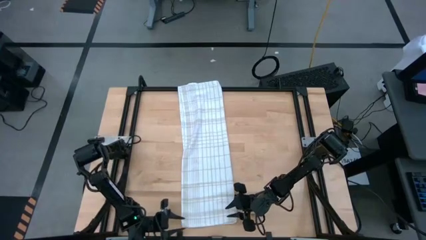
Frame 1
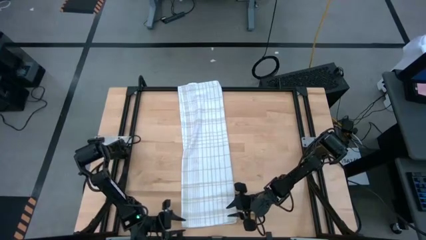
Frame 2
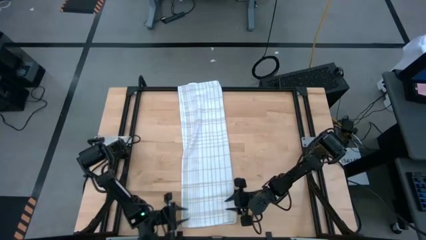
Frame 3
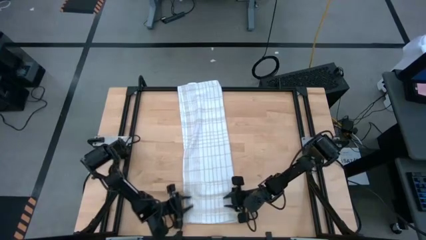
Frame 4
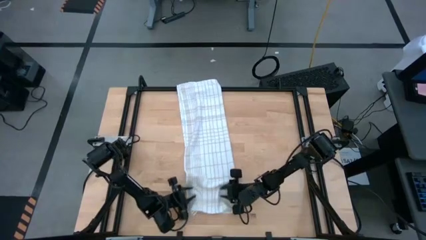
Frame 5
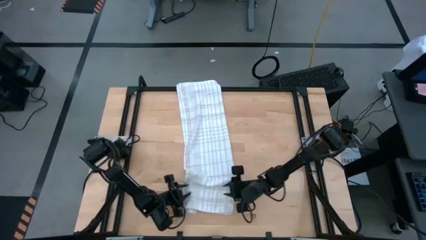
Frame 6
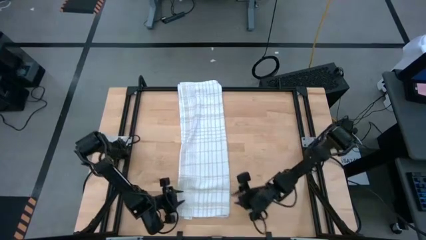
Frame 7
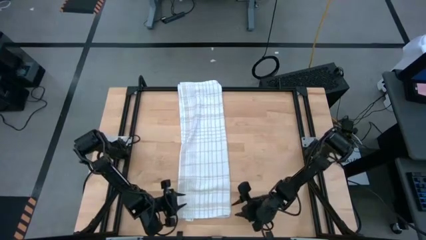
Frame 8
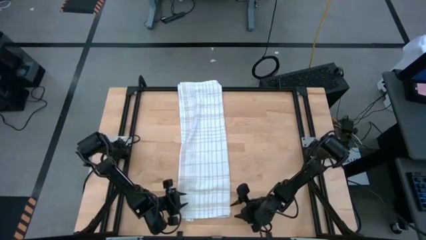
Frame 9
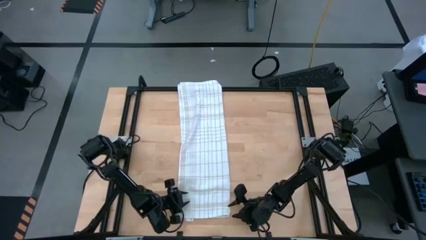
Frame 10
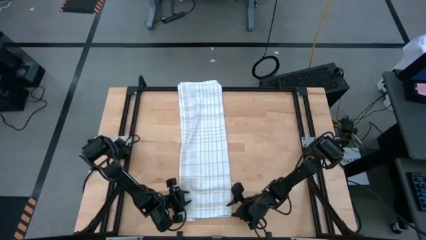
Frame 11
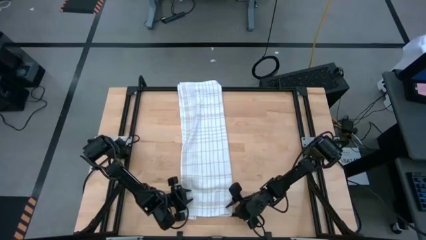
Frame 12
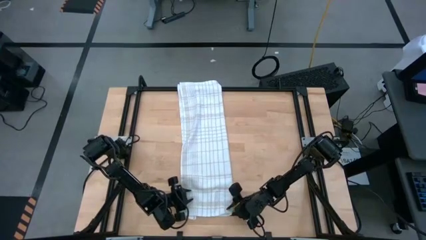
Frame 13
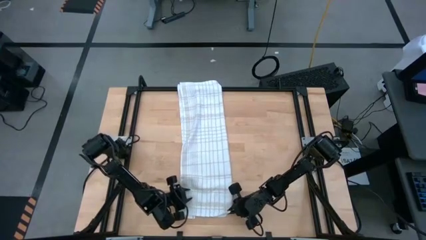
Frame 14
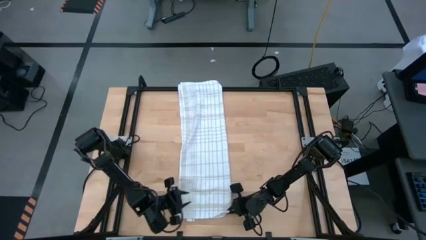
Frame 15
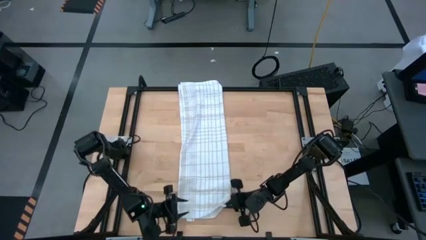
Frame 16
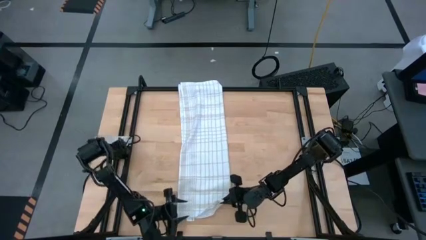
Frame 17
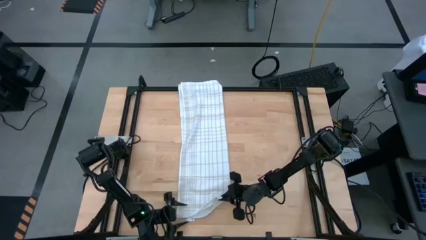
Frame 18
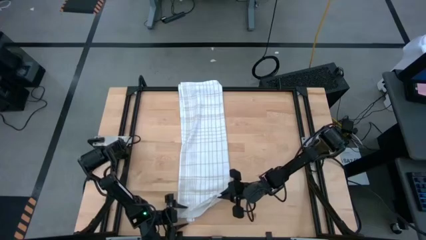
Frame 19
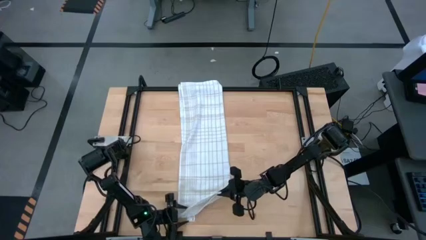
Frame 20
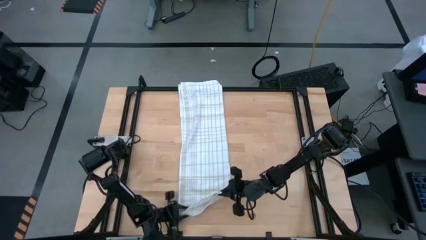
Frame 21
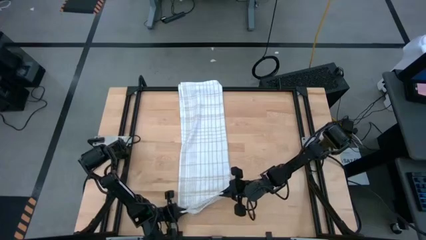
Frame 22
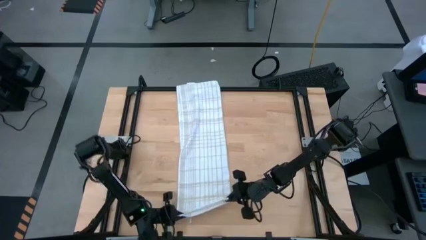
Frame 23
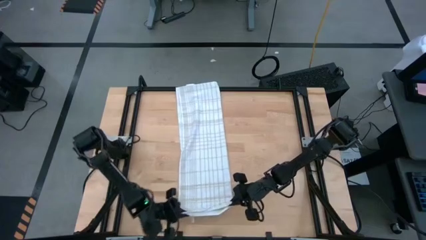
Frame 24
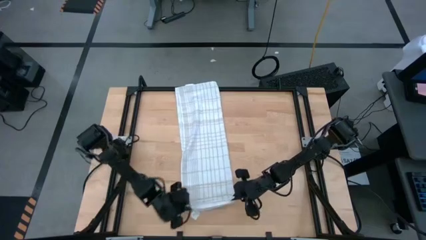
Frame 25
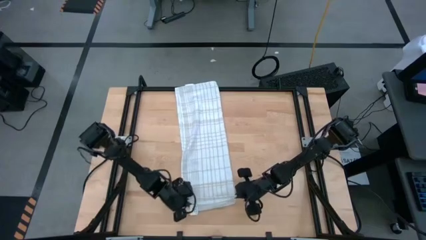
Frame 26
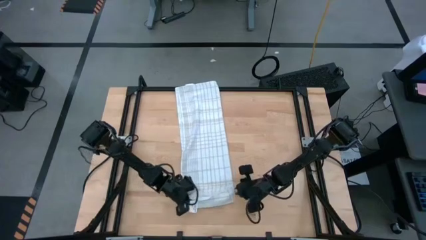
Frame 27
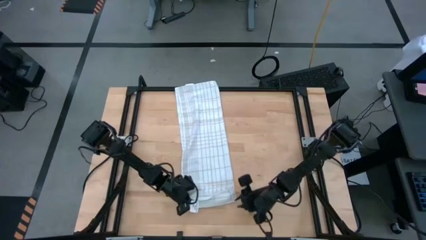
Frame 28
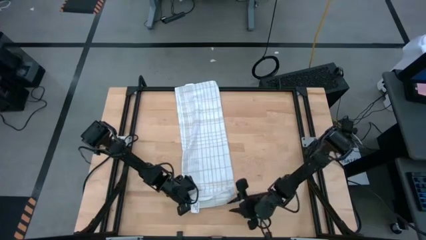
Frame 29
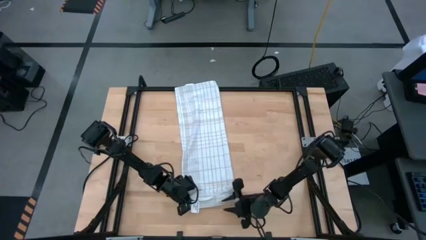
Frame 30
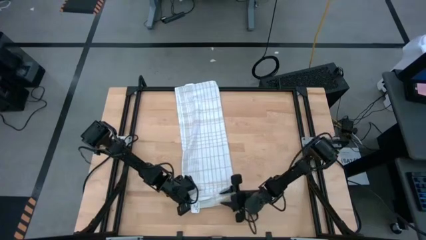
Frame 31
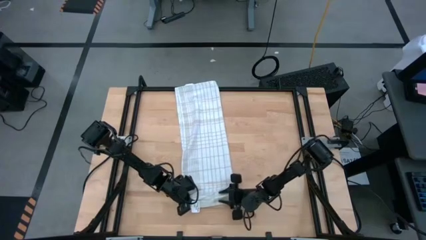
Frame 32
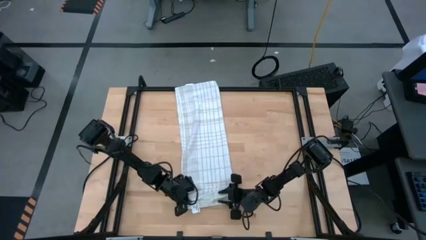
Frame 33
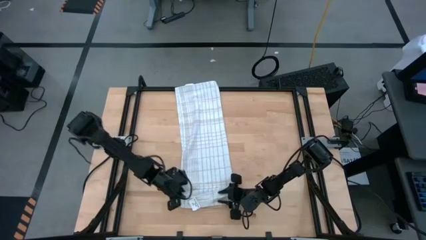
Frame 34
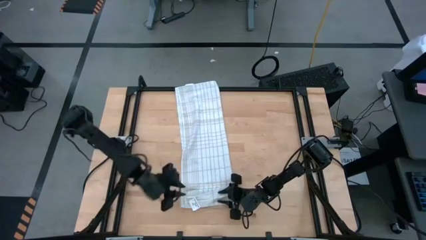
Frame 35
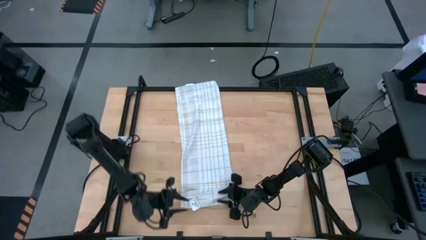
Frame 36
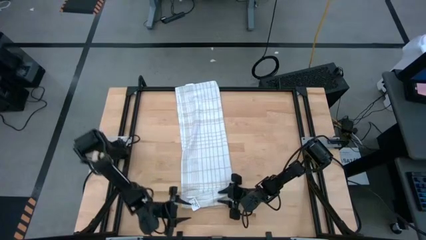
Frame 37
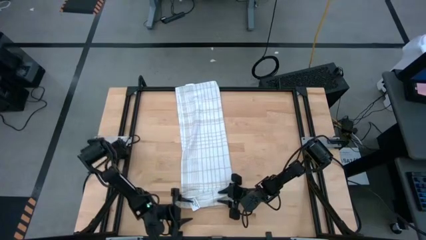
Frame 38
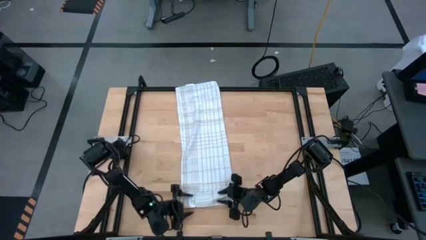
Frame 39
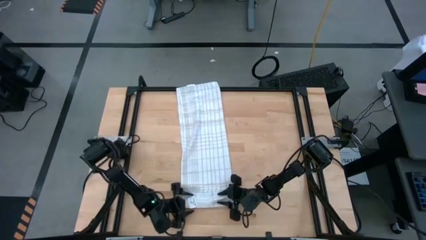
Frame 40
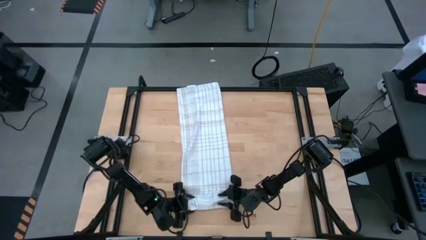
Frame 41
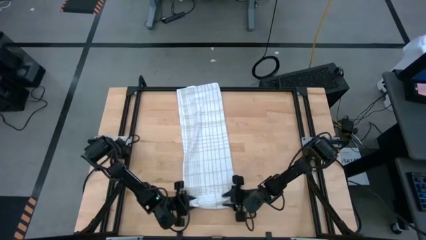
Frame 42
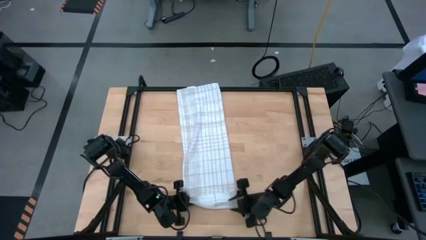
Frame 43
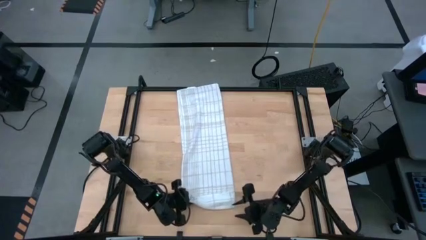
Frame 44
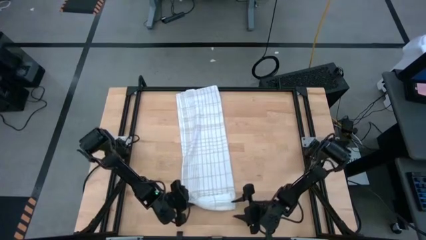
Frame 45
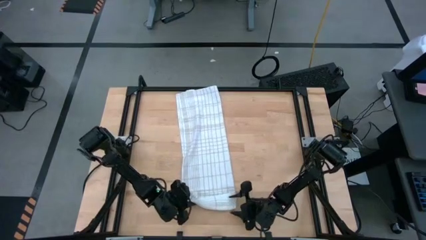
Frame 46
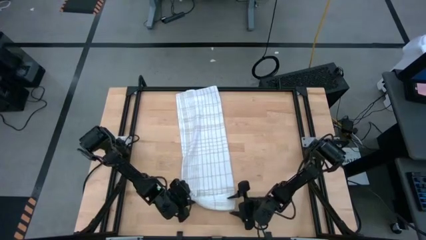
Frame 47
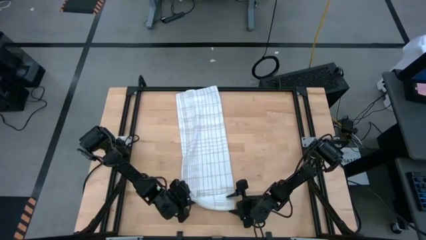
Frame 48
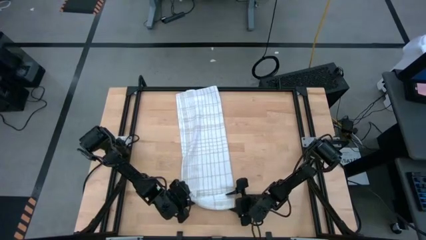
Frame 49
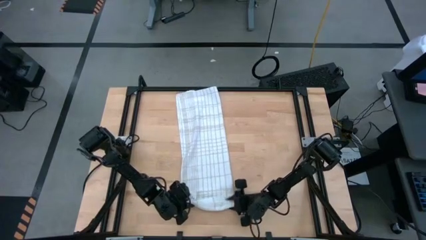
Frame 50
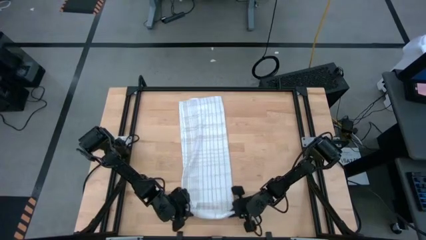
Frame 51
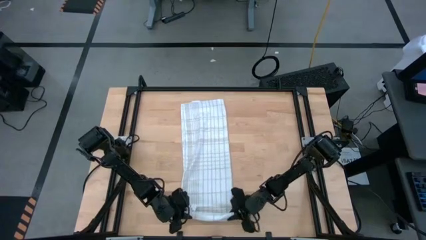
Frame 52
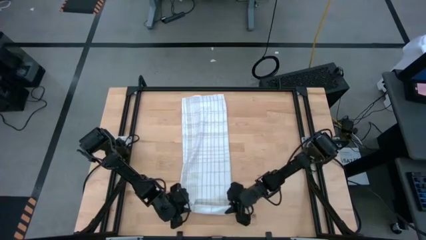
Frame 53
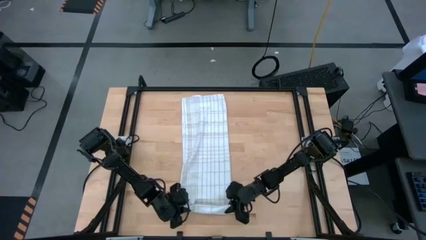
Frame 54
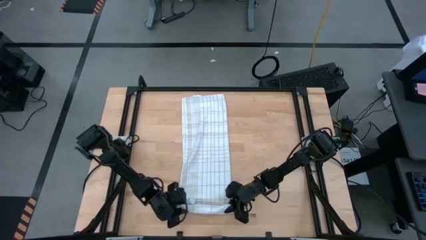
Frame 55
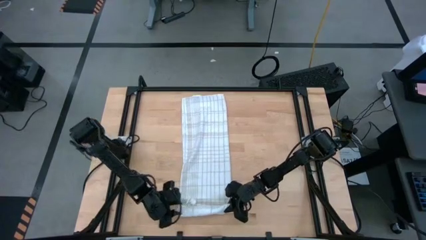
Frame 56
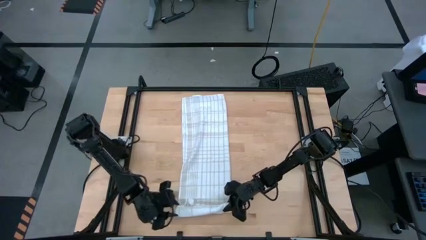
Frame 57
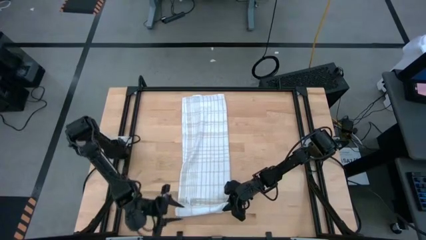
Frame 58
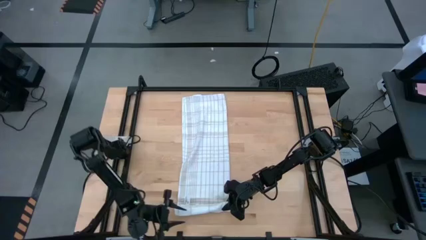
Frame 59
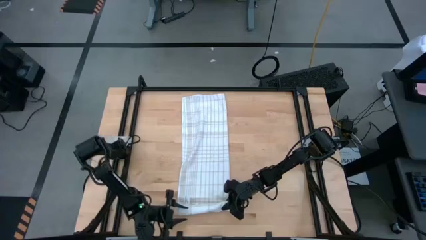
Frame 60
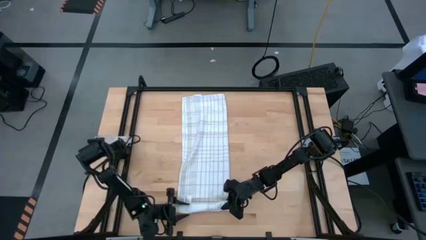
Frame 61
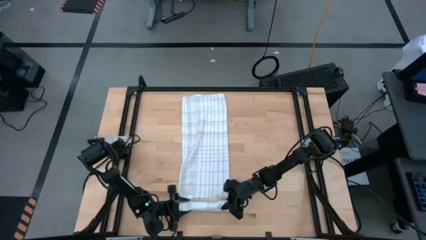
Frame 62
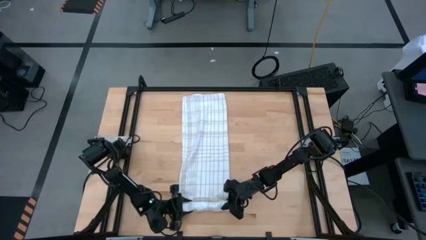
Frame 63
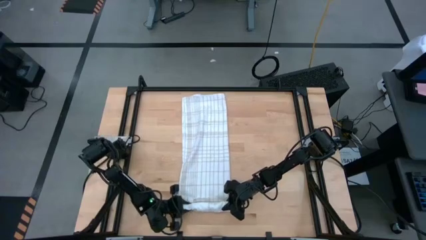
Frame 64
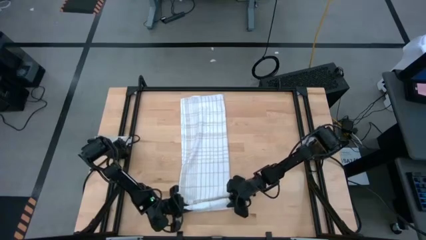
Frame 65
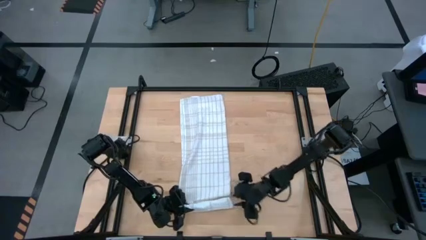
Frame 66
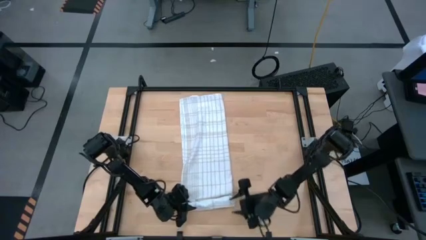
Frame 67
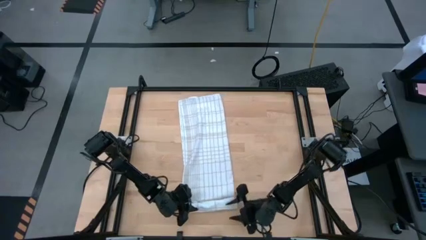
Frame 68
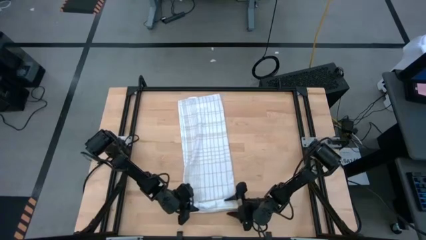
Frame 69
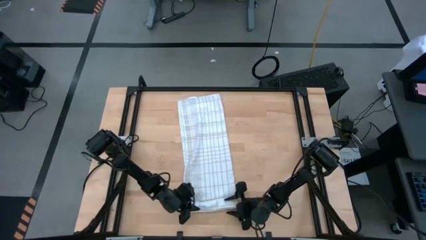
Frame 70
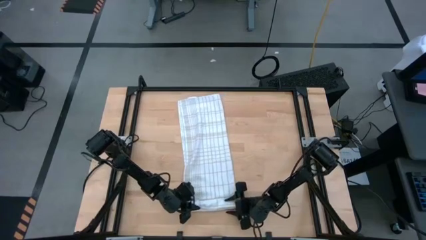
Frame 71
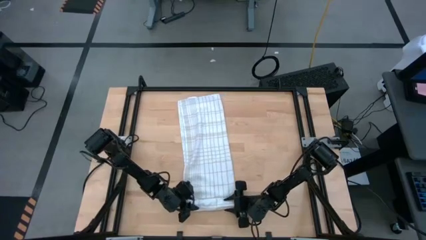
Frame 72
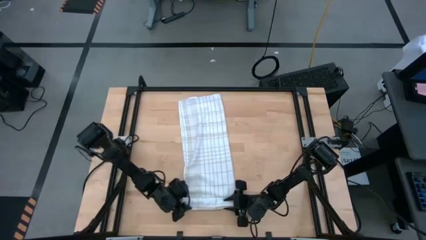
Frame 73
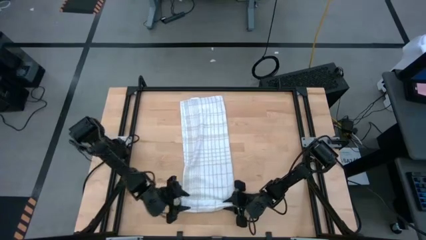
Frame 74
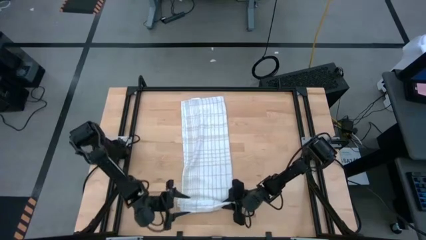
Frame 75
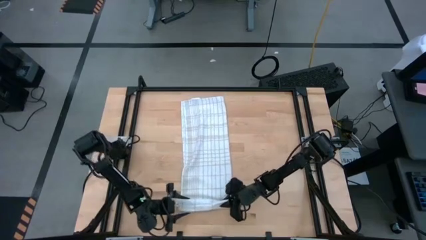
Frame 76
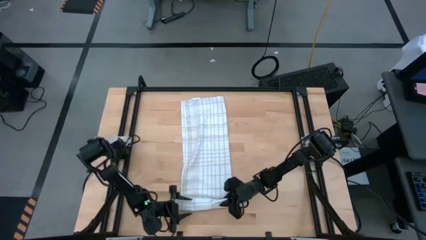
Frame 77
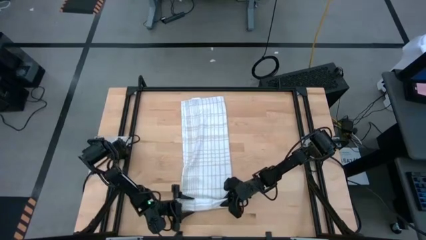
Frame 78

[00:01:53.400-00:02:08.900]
Task: Roll towel
Roll the white towel

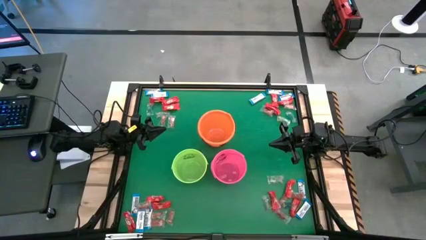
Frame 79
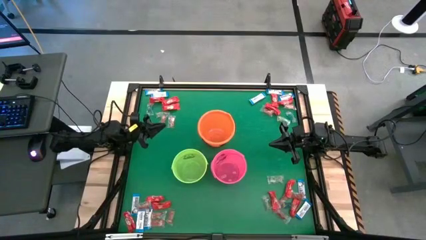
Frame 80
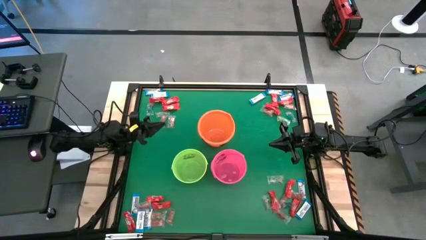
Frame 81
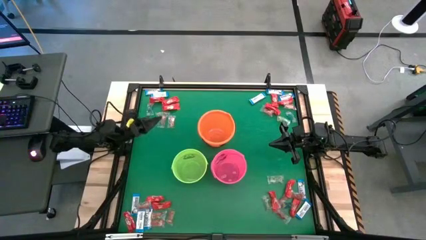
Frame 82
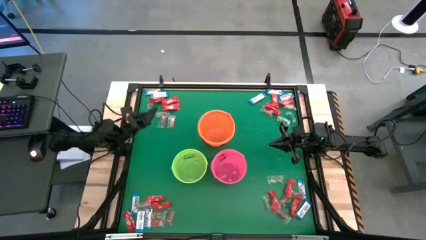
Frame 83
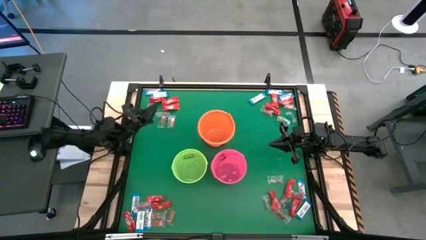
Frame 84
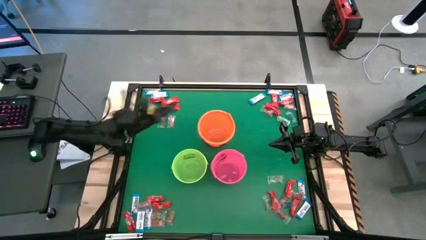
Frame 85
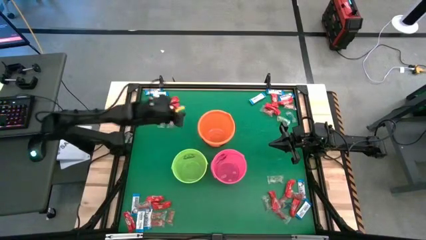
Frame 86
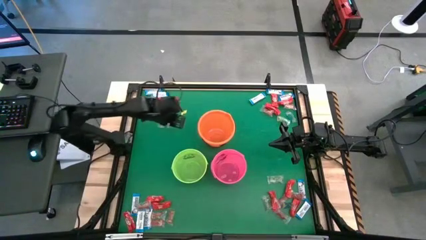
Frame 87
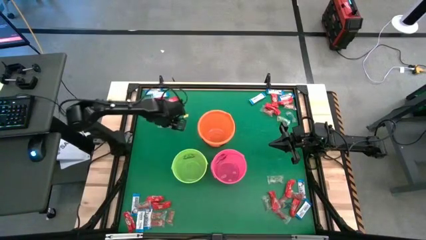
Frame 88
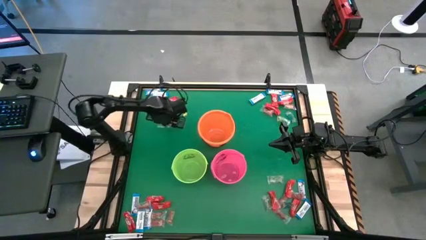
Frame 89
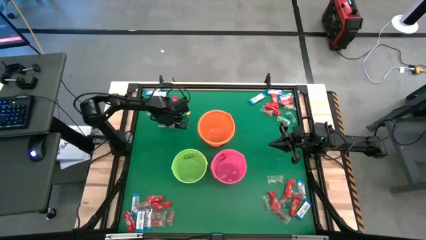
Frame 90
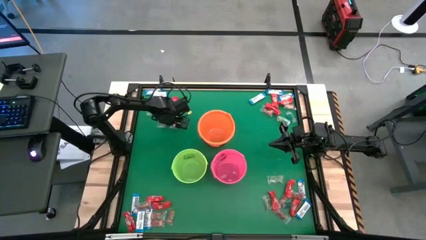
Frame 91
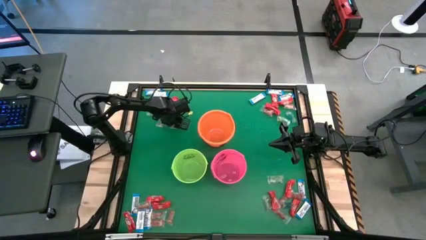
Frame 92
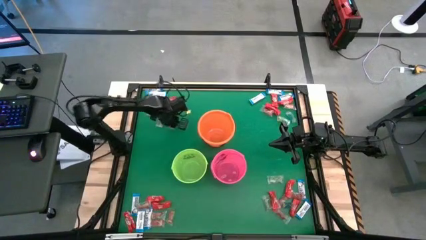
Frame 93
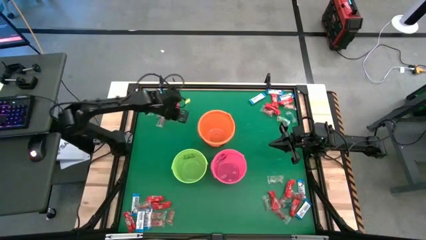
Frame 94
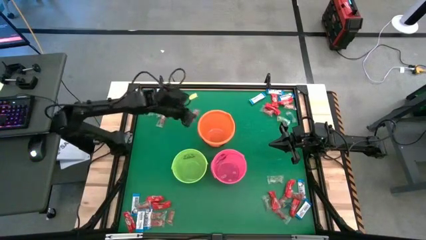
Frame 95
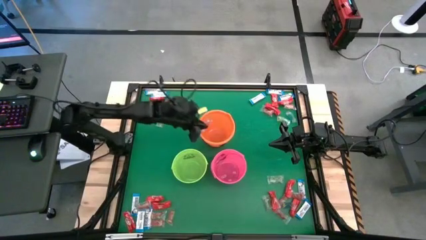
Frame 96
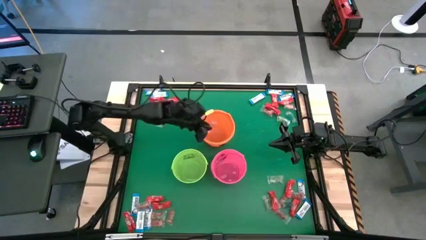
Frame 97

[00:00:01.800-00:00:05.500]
Task: Sort candy by brand, put in halloween buckets
Put the orange gummy into the orange bucket
